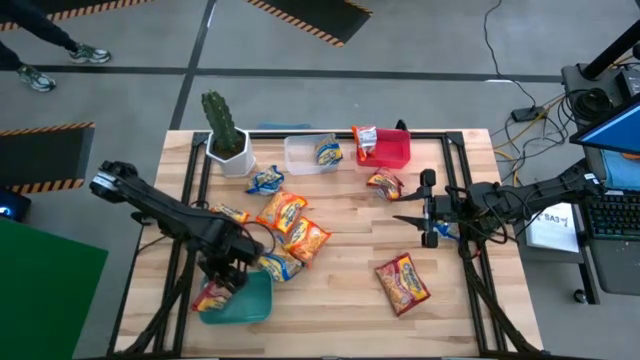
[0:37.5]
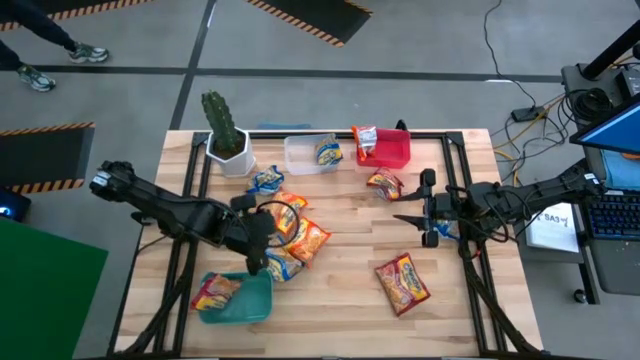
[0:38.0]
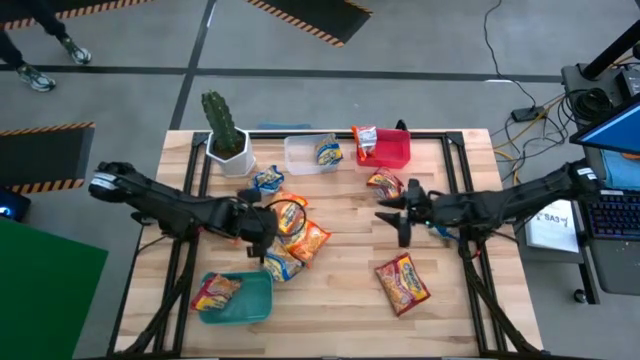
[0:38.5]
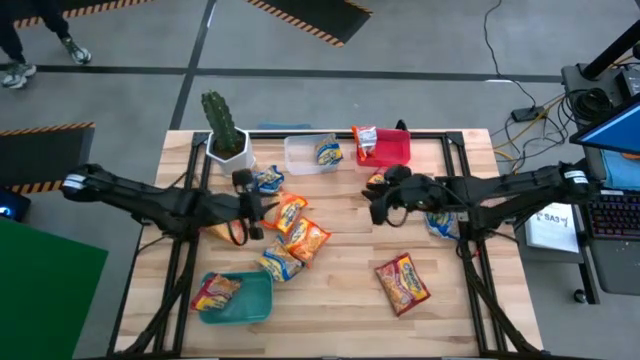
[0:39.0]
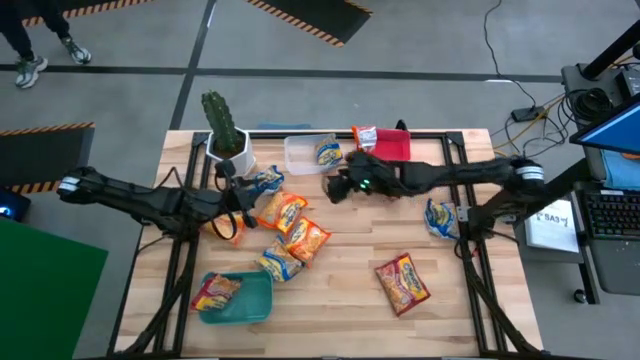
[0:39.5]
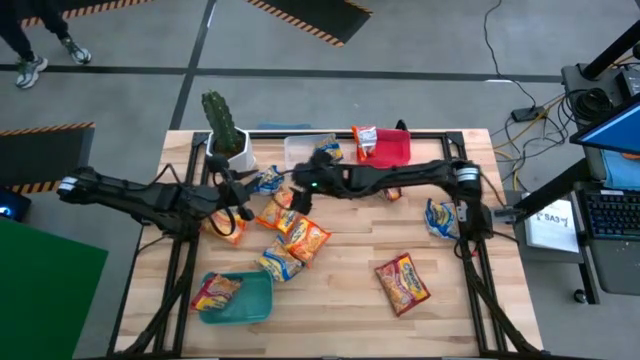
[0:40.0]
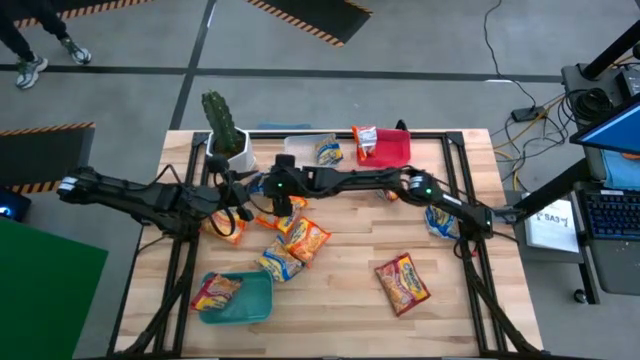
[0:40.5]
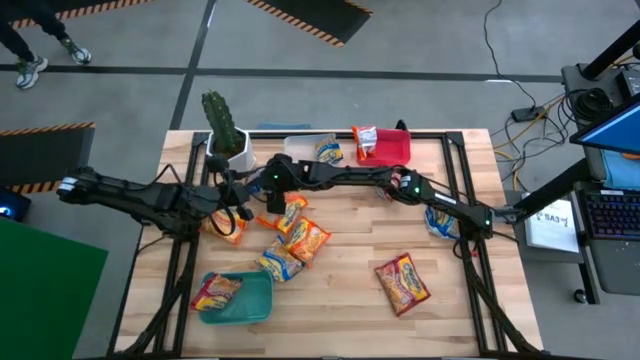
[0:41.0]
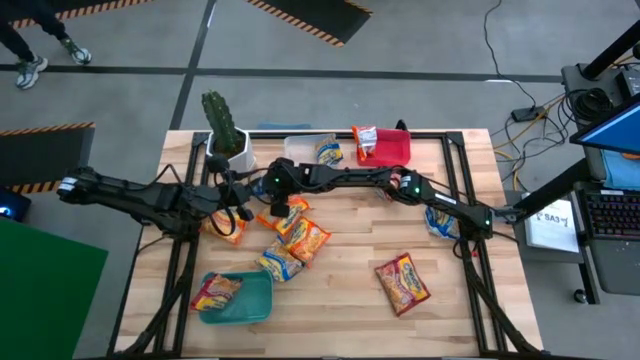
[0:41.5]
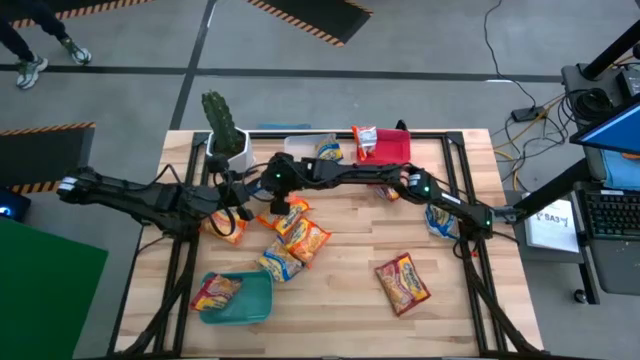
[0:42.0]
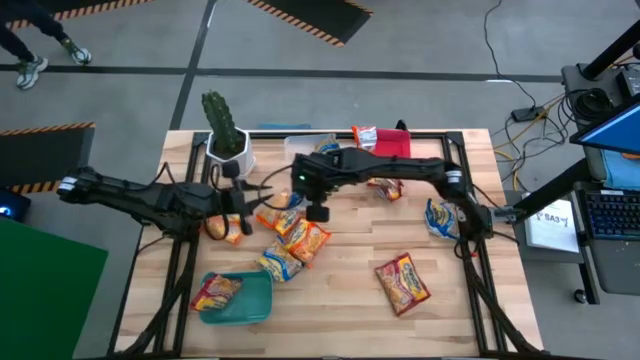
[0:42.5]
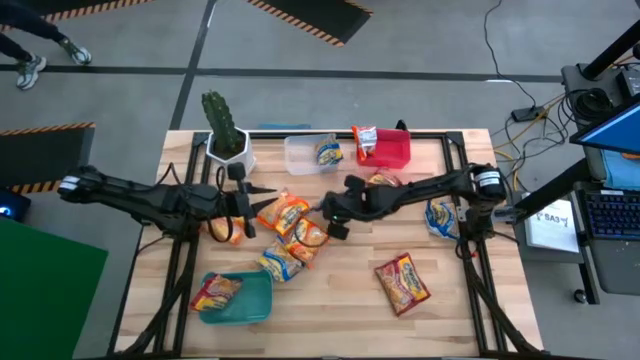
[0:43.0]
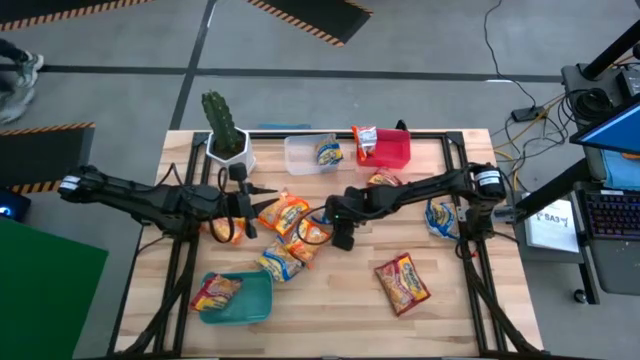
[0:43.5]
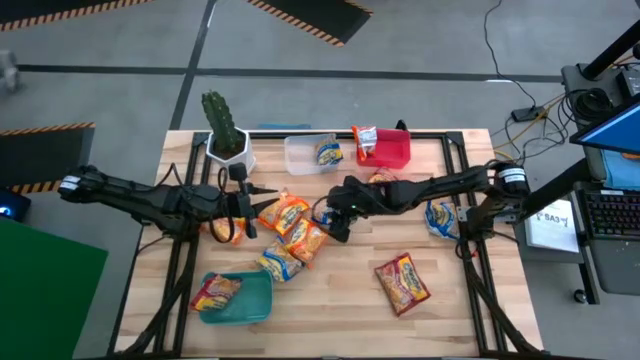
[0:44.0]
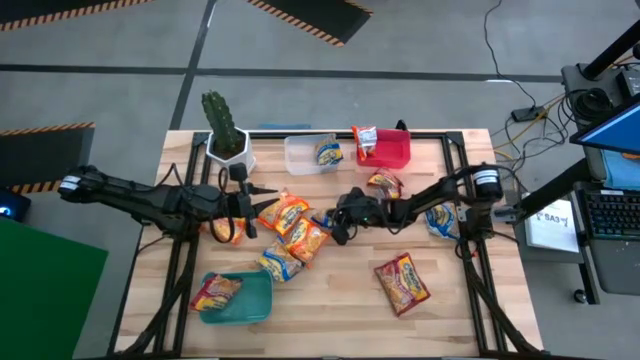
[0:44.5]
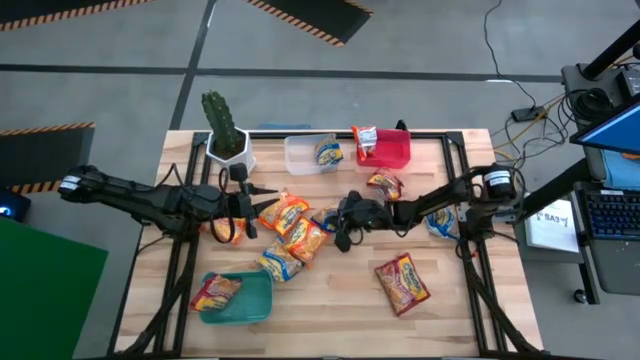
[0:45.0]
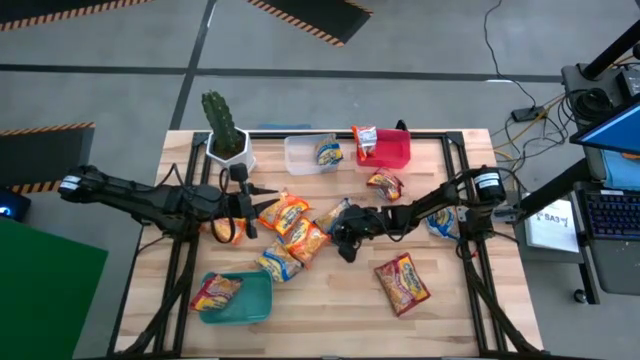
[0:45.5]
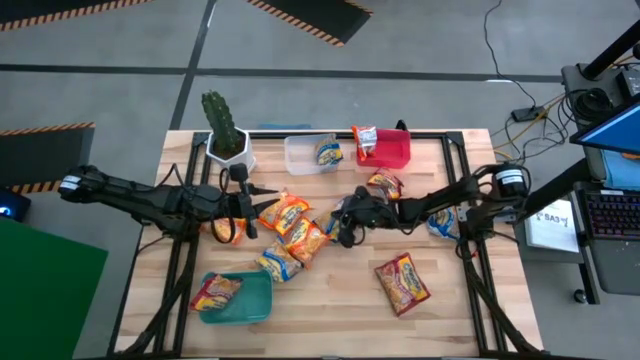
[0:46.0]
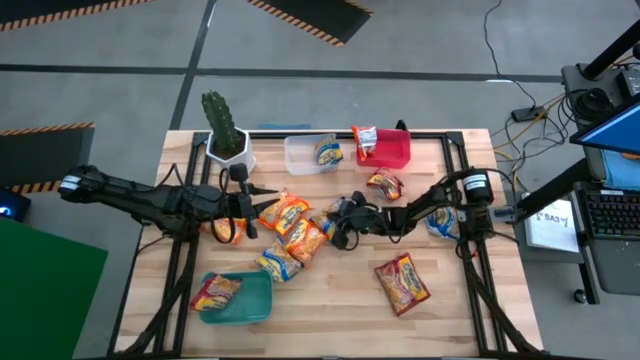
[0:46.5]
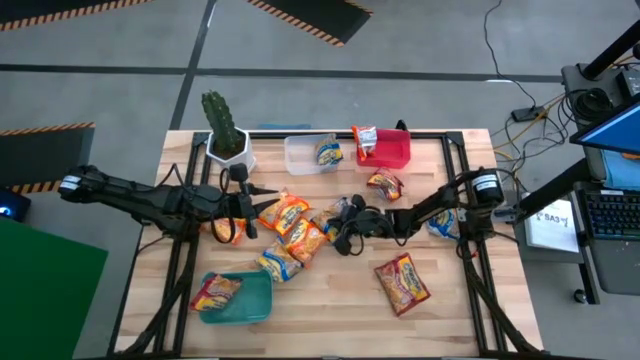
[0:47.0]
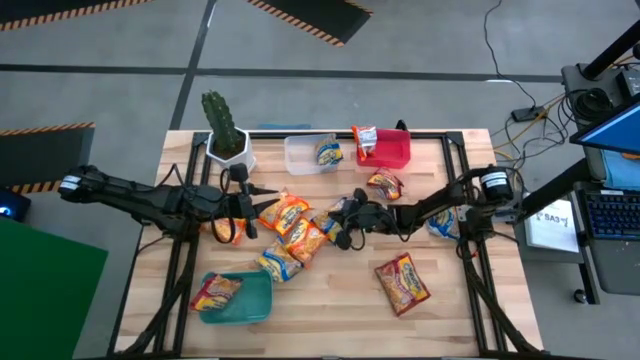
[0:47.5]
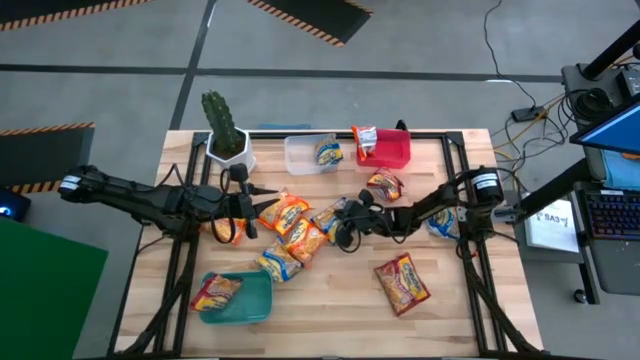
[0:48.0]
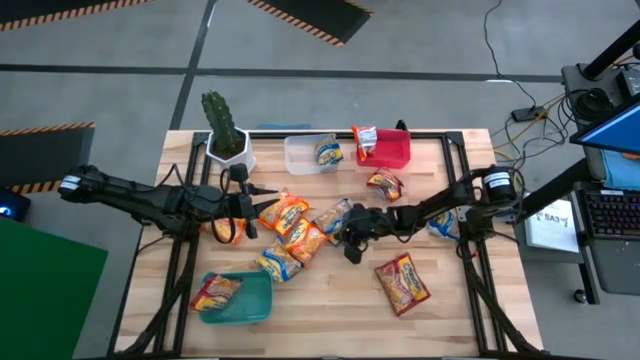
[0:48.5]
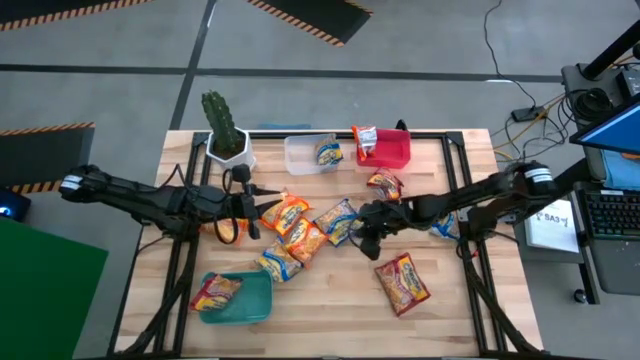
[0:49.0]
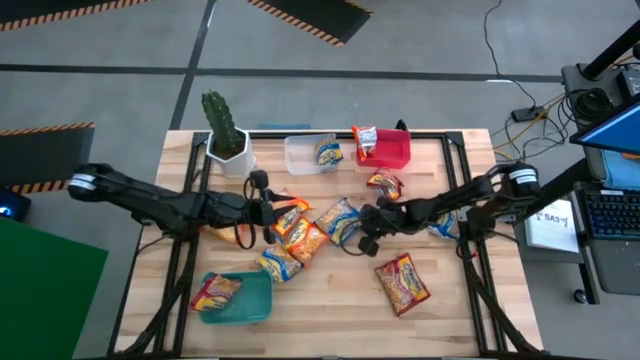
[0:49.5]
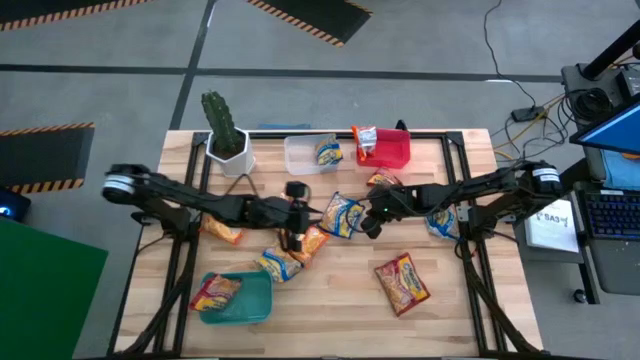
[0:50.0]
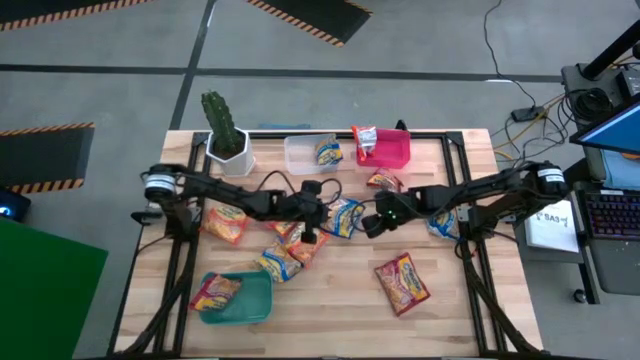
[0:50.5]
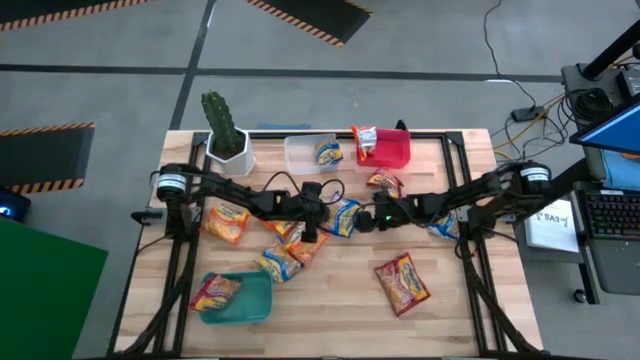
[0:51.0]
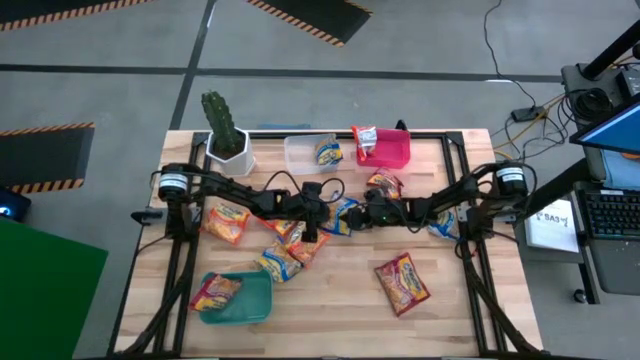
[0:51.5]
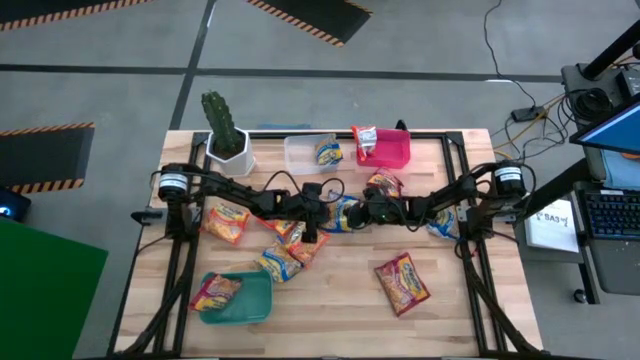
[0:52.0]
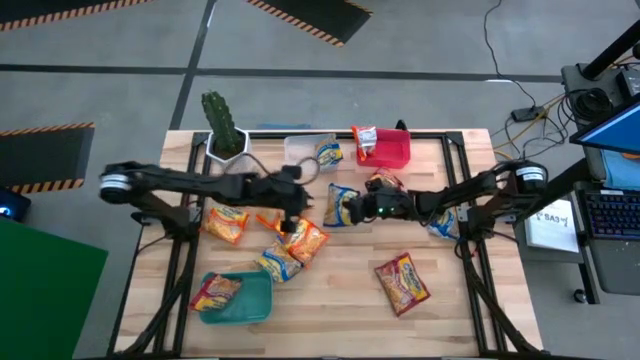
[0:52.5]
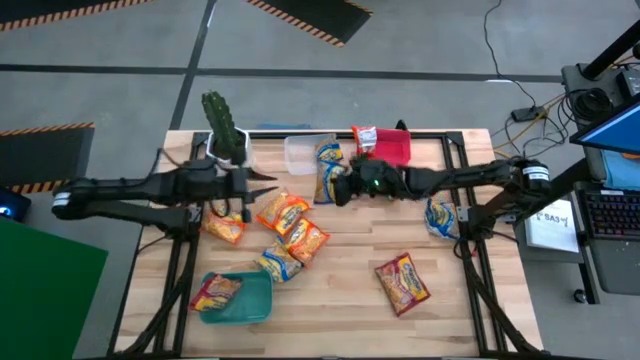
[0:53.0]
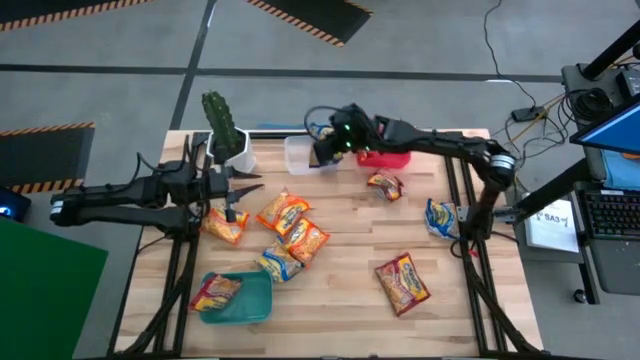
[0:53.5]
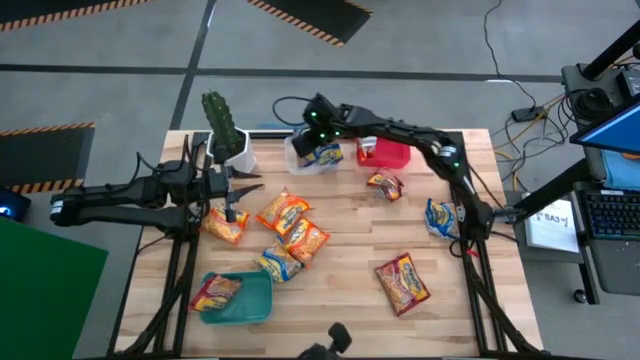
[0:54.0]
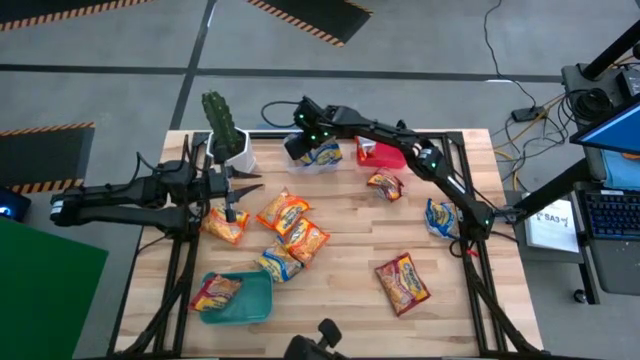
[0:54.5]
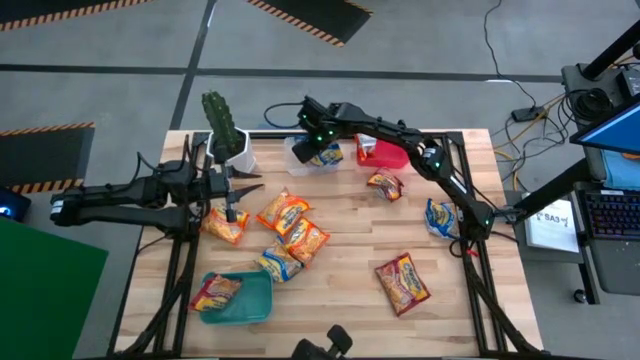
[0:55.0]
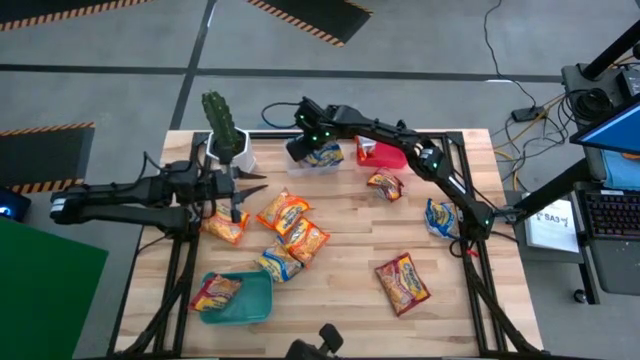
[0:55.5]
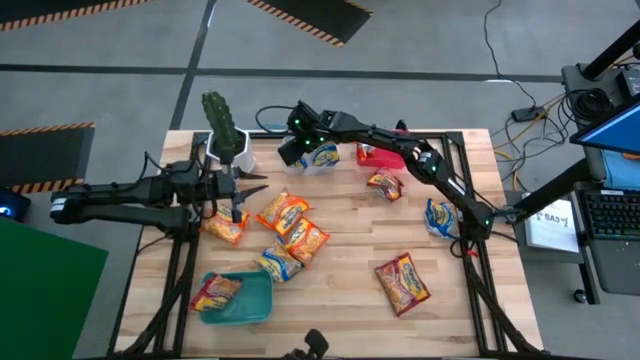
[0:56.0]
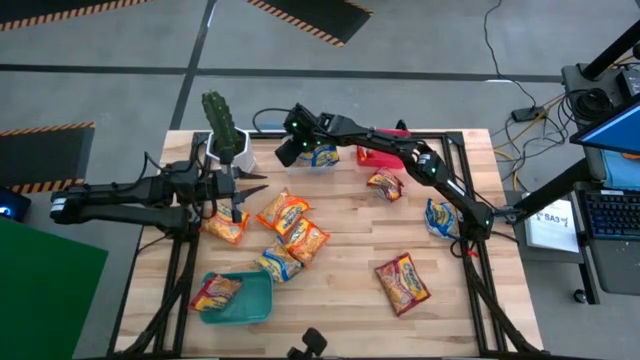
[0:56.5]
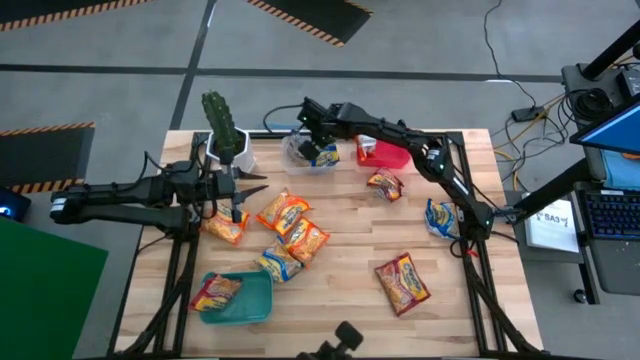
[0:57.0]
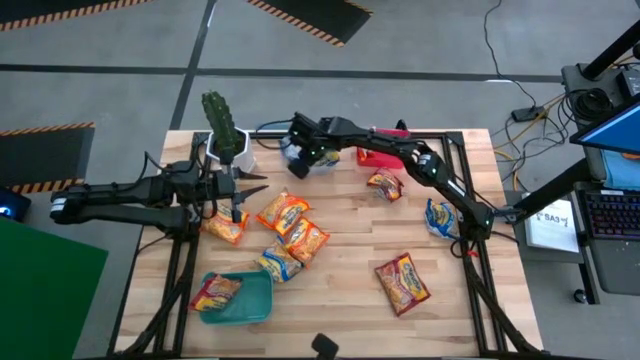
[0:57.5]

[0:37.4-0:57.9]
Task: Sort Maruchan noodles
Put the blue noodle pack into the white bin
